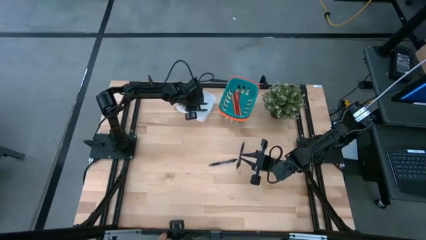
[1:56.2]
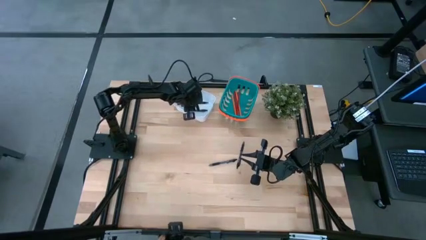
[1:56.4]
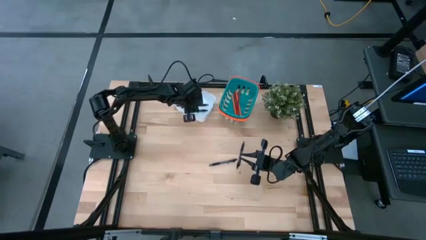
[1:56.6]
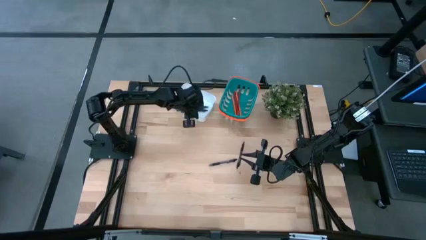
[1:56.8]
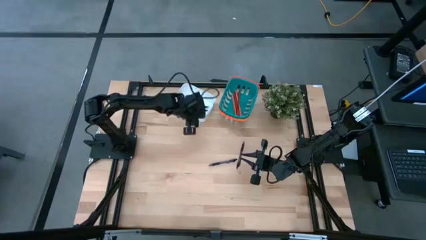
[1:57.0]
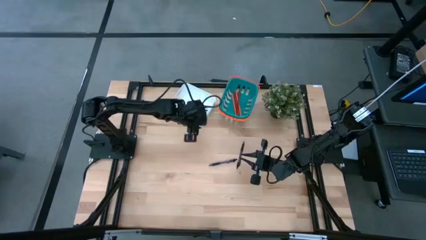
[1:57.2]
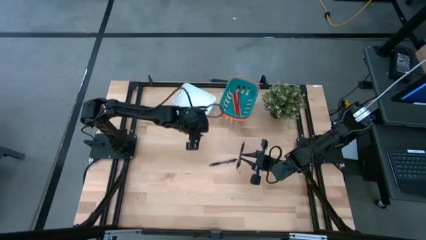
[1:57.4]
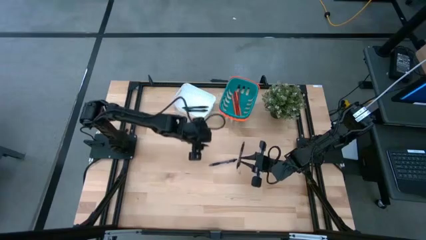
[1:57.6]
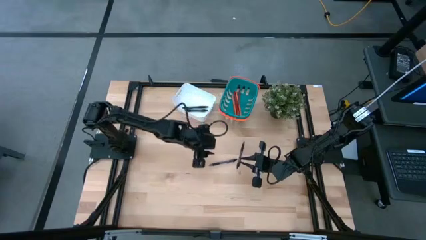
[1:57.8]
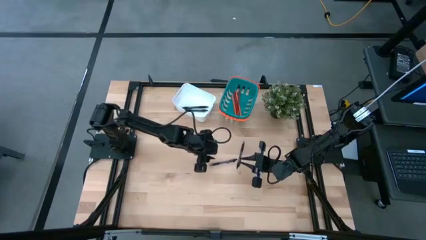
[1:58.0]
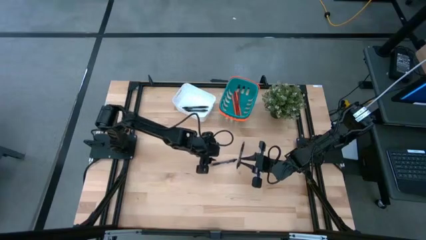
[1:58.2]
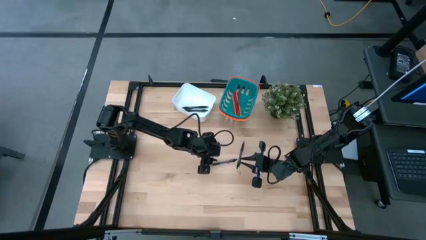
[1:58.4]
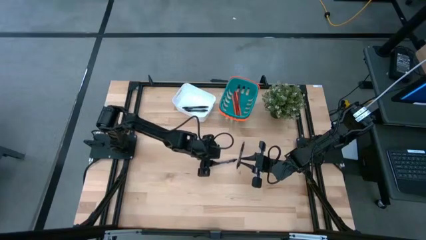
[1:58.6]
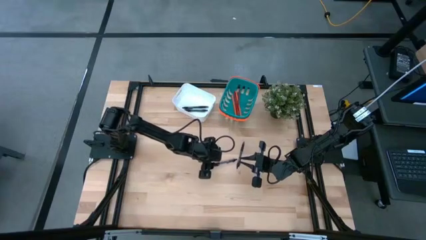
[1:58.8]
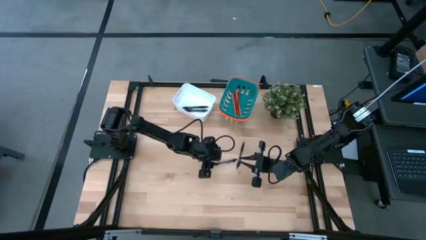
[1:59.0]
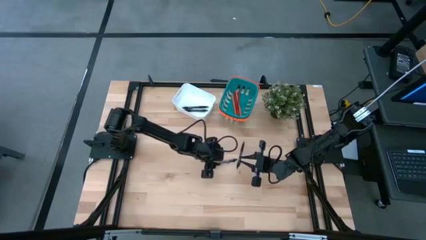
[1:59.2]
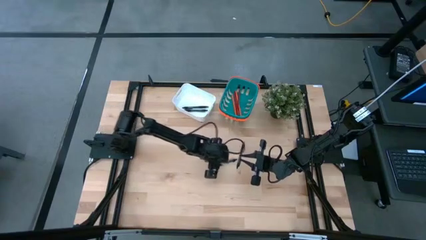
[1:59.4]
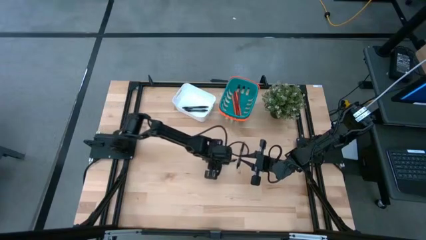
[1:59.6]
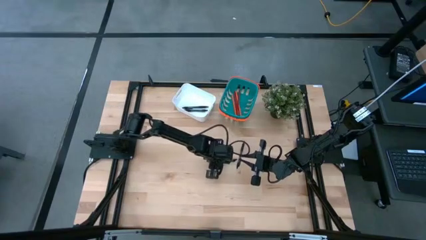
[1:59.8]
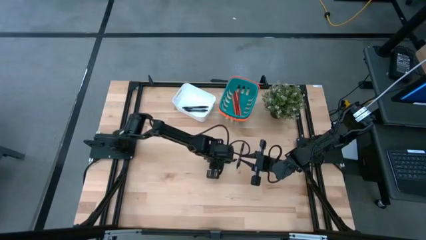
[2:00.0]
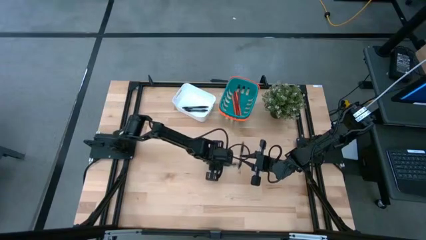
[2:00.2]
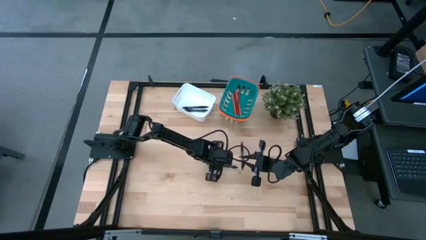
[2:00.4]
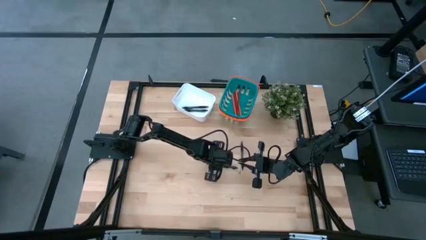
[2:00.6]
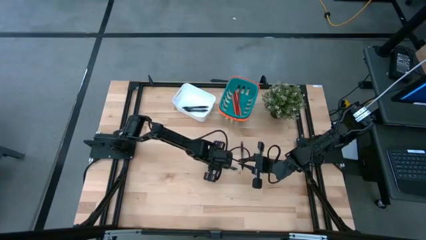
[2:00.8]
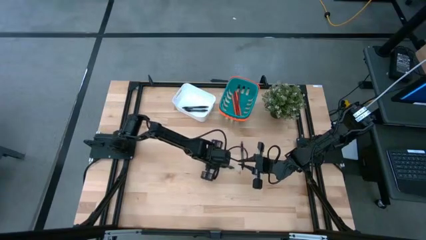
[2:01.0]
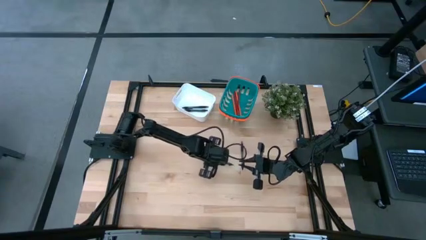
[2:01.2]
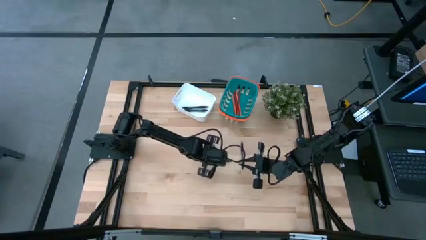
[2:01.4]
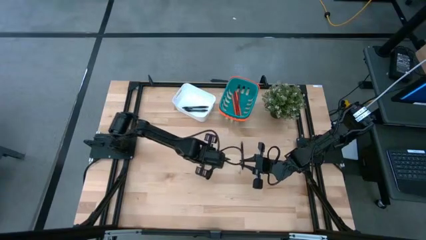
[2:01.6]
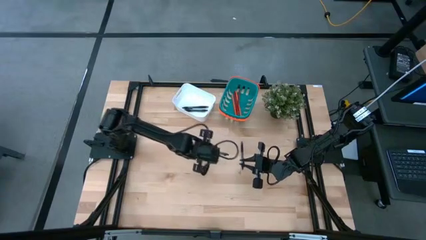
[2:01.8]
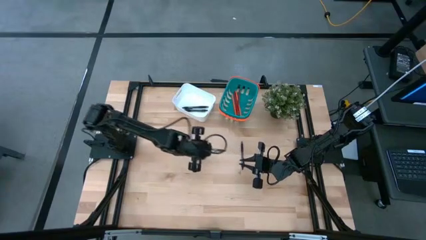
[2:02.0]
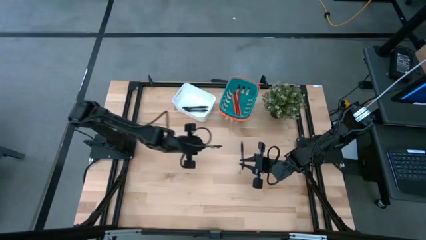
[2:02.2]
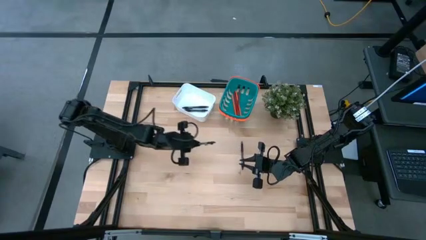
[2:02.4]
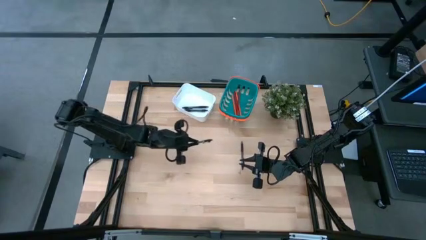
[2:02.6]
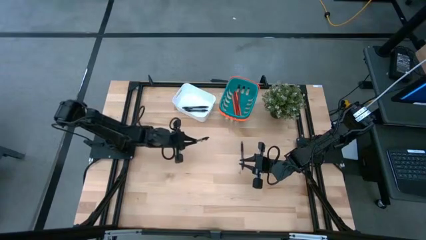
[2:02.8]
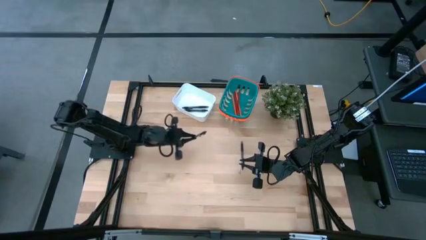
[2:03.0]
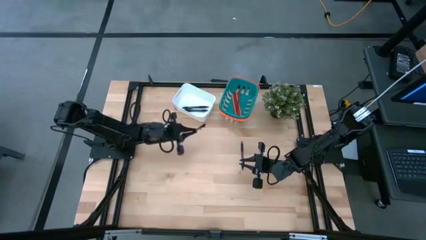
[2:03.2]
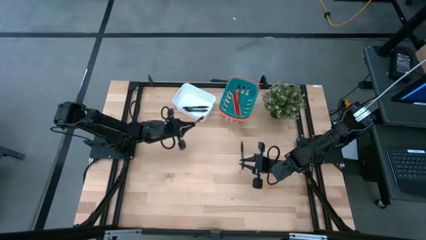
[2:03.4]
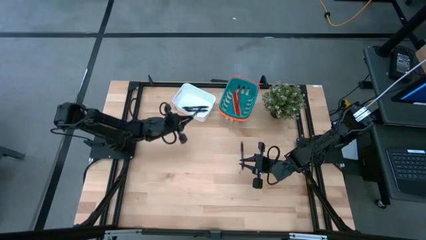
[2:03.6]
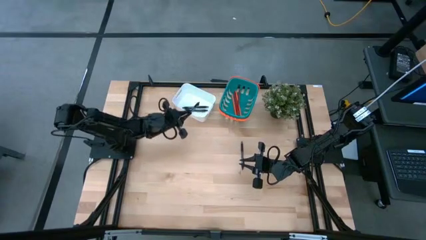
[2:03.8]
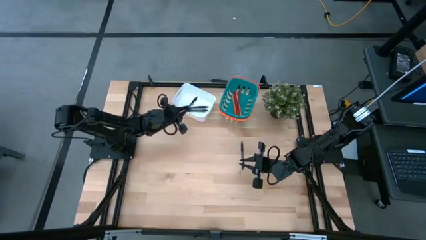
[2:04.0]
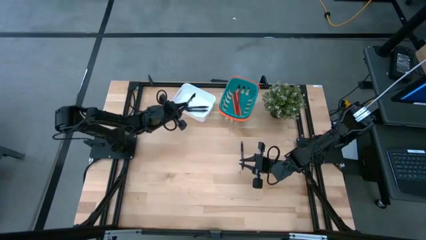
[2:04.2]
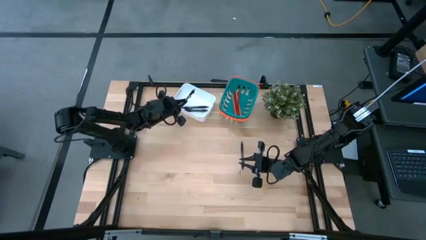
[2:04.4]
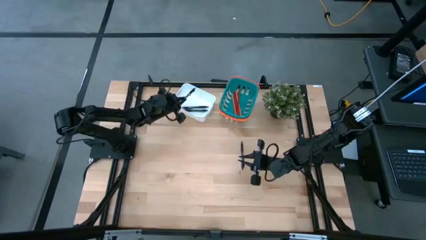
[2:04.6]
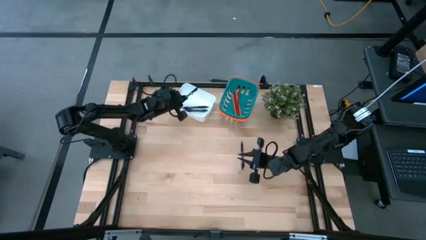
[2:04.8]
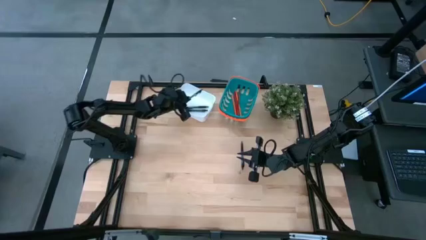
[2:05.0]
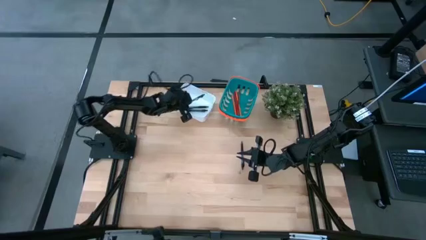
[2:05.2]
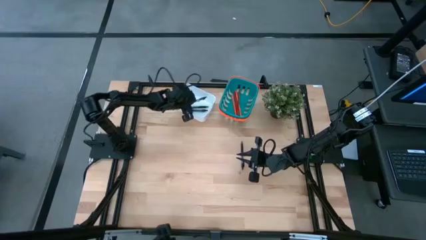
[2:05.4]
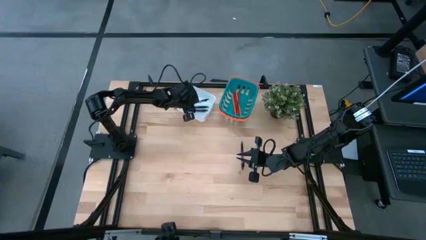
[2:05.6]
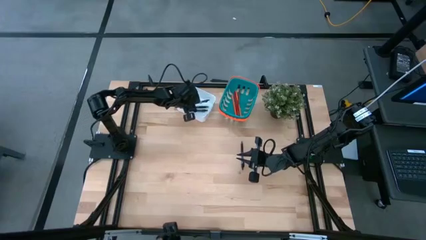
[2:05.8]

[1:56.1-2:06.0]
Task: Sort pens & pencils
Put the black pen into the white bin

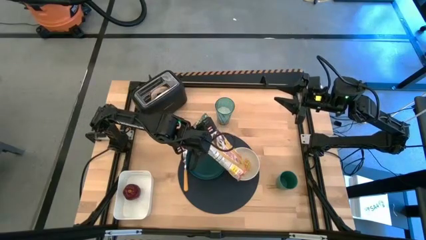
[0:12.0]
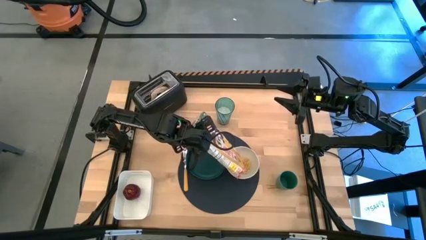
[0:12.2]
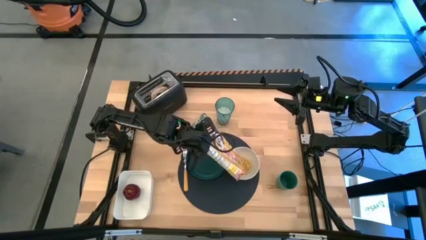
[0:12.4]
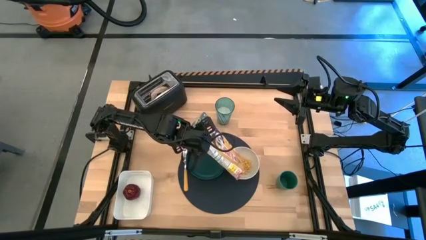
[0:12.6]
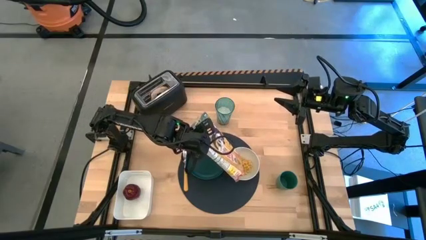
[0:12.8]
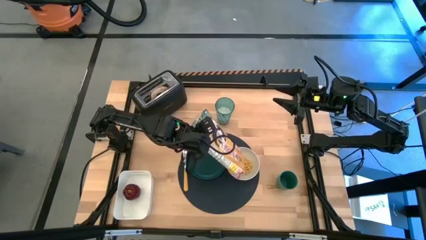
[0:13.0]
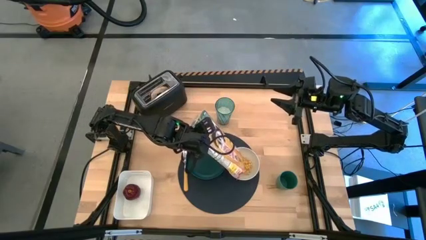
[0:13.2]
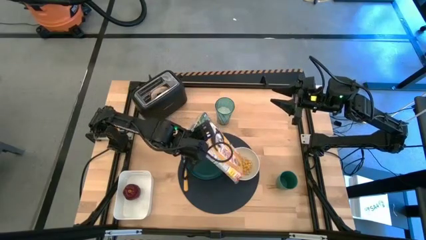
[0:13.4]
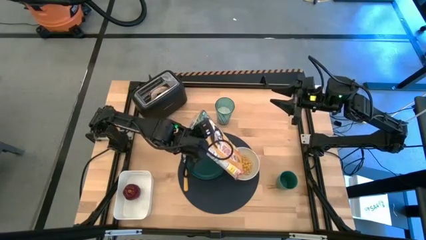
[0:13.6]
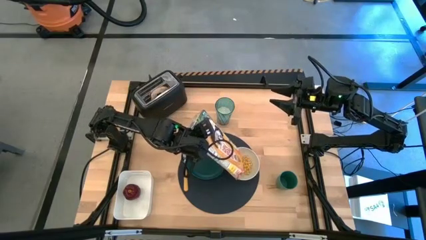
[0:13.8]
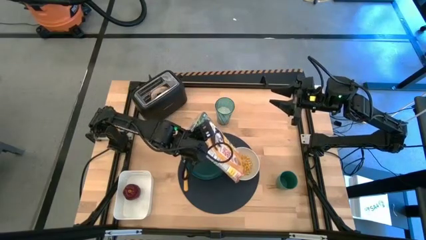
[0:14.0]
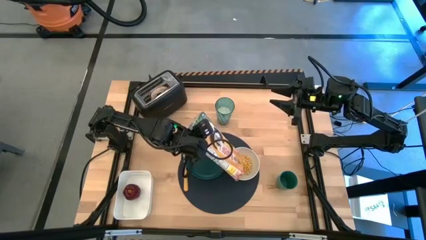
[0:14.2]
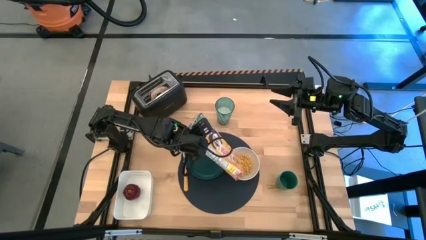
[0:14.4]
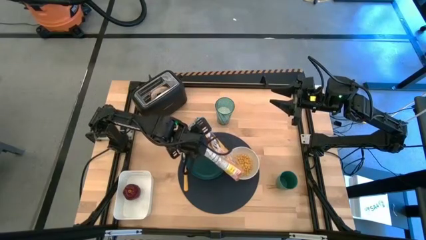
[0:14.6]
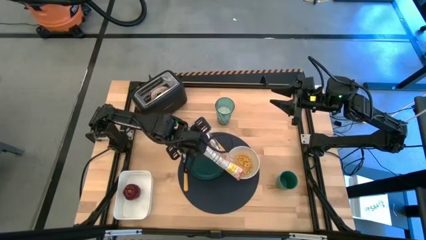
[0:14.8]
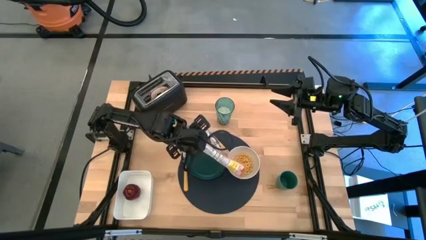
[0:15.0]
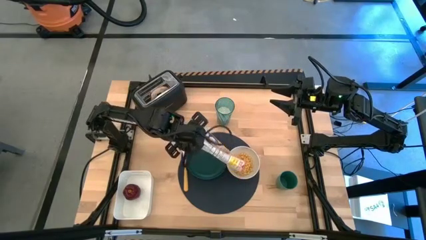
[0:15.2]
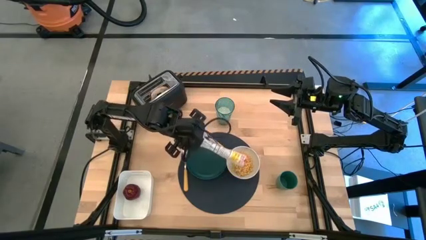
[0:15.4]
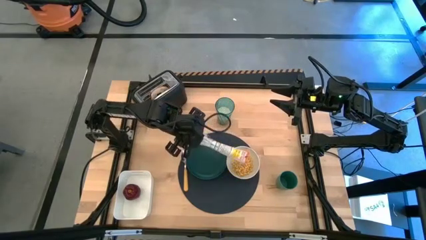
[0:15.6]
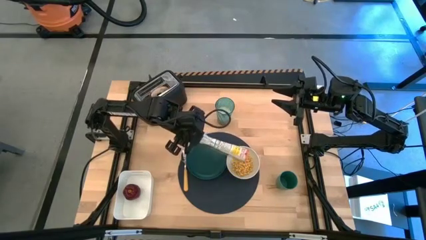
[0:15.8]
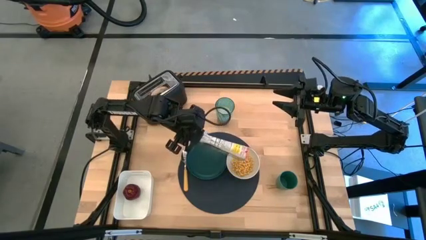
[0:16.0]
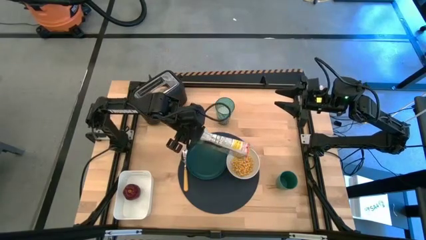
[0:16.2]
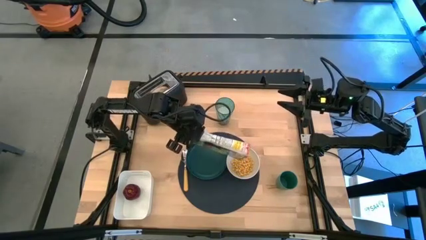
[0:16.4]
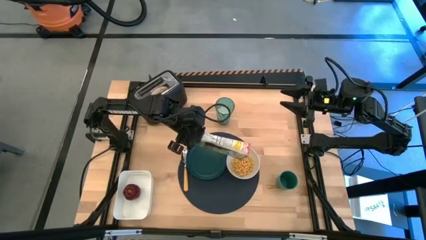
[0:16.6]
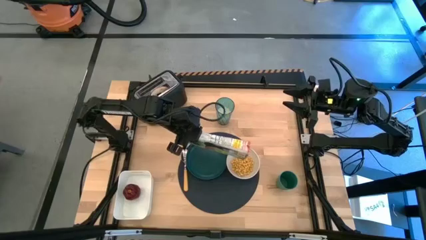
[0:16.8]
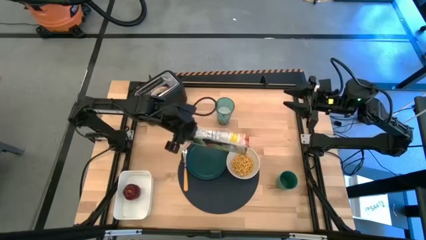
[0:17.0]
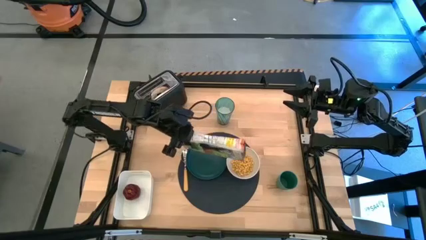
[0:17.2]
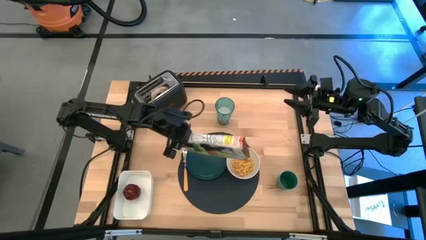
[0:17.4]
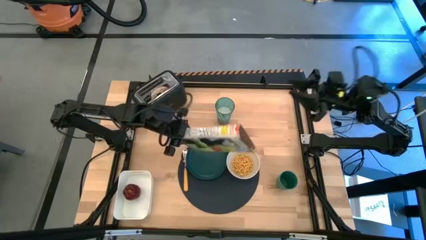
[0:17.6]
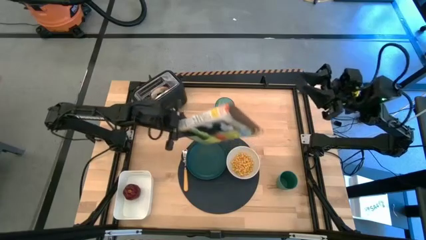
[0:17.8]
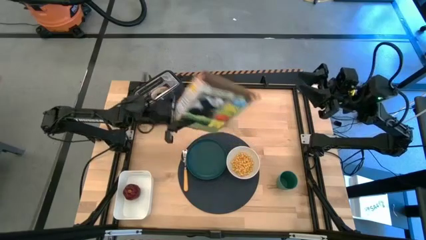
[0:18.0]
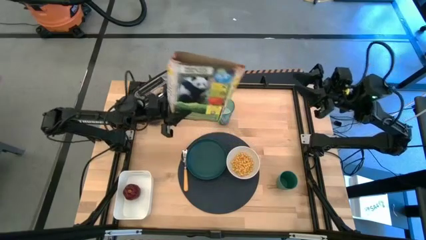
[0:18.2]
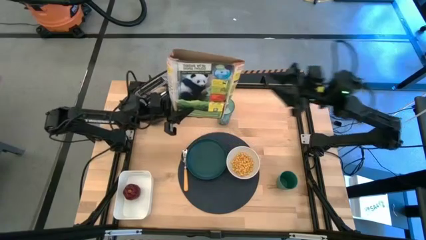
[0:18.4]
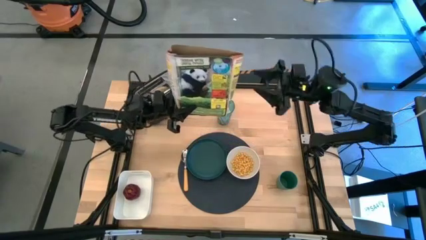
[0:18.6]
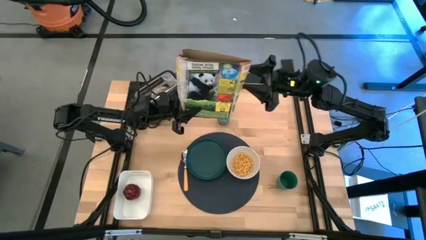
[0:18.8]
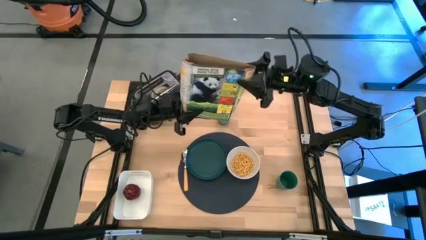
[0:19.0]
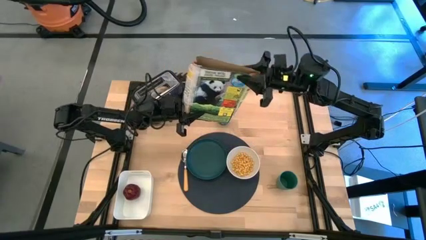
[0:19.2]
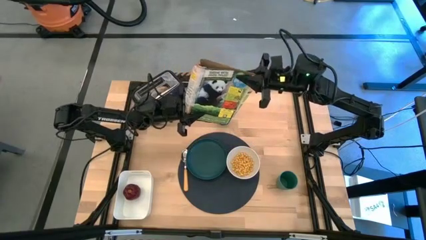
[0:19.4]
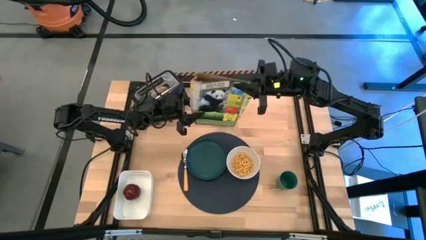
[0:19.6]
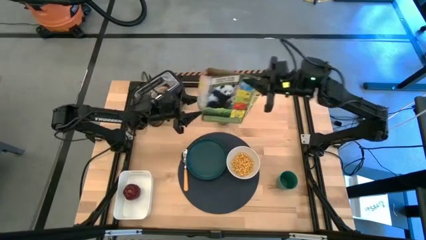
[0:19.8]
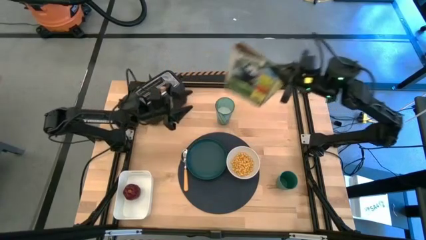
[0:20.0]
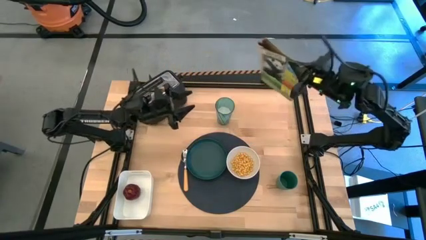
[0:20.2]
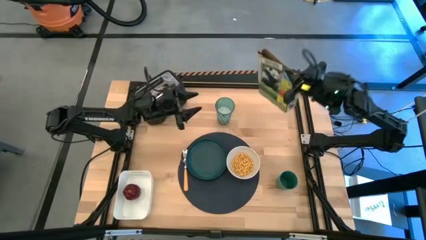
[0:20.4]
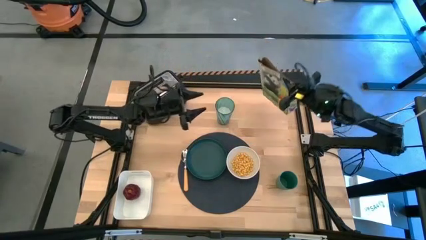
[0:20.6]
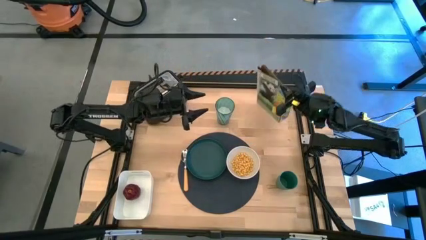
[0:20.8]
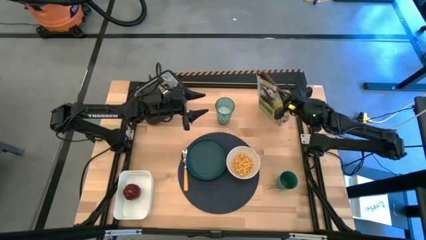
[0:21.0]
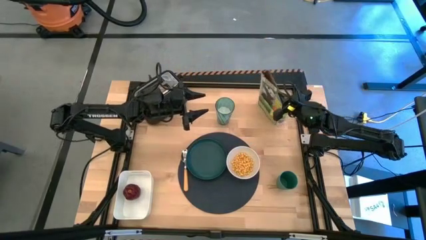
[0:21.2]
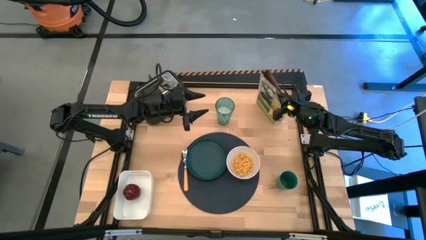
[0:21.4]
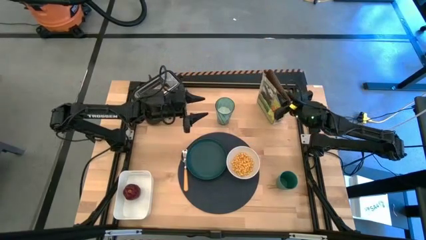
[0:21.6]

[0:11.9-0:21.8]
Task: Arrange a breakfast setting
Pour the cereal into the white bowl
